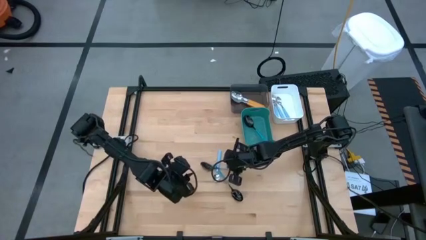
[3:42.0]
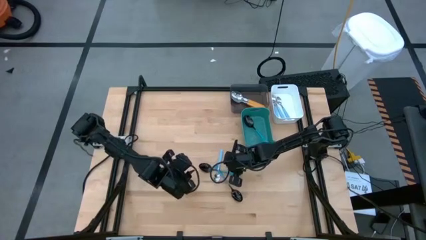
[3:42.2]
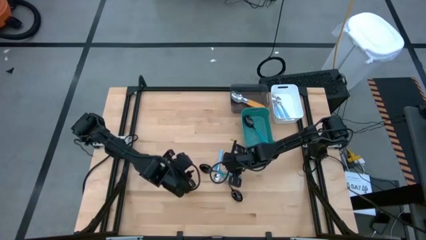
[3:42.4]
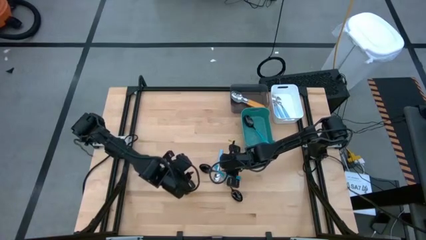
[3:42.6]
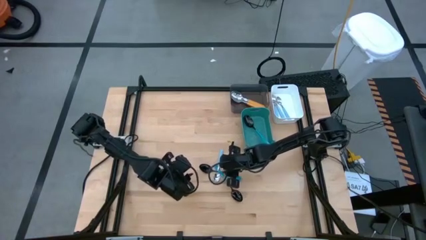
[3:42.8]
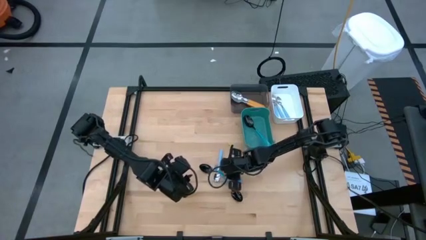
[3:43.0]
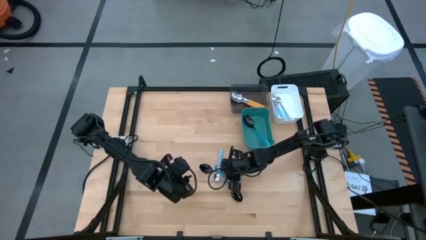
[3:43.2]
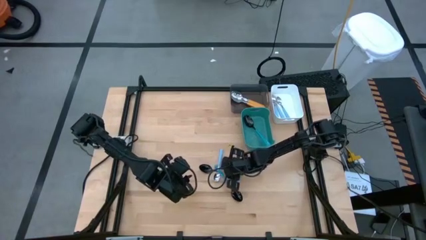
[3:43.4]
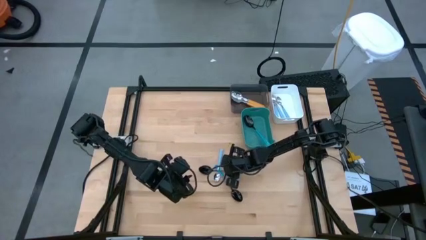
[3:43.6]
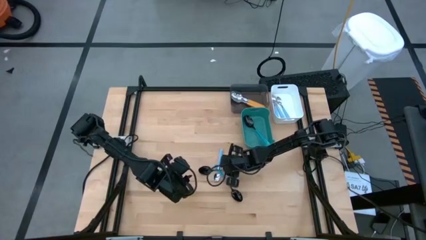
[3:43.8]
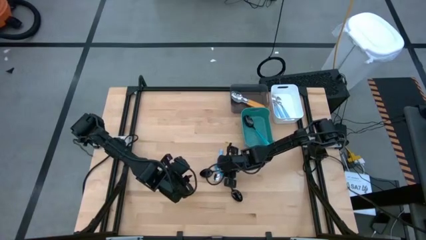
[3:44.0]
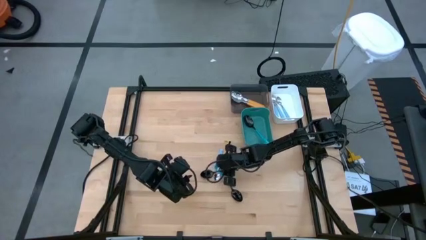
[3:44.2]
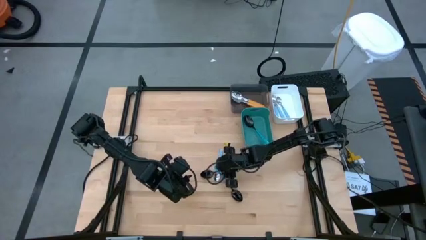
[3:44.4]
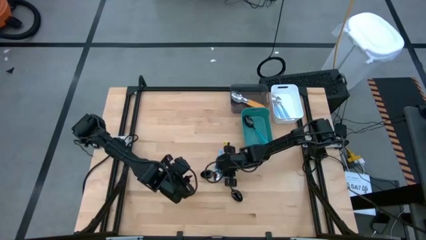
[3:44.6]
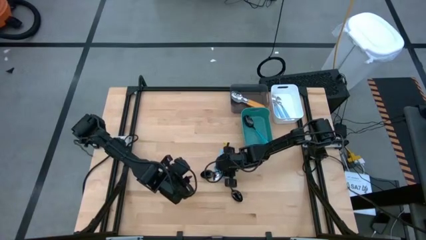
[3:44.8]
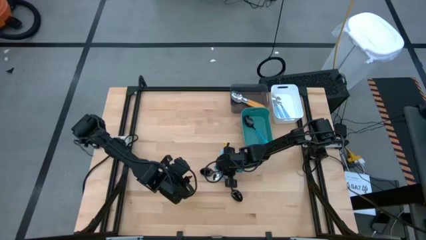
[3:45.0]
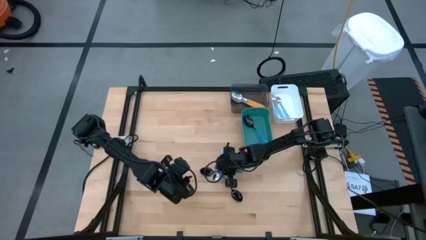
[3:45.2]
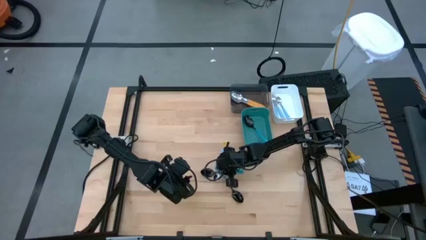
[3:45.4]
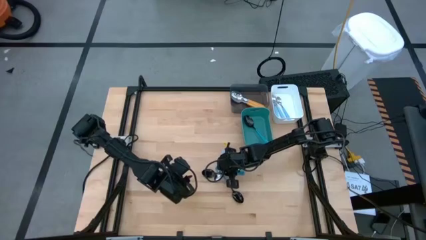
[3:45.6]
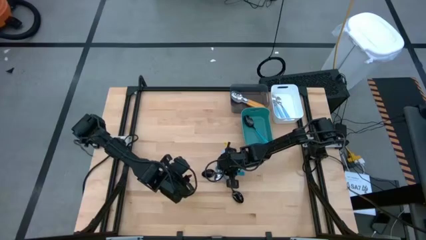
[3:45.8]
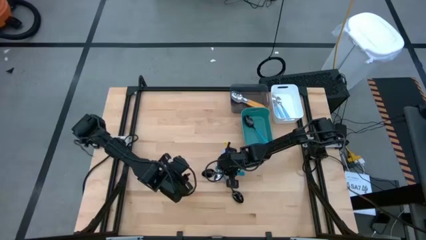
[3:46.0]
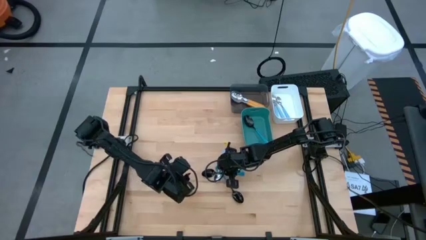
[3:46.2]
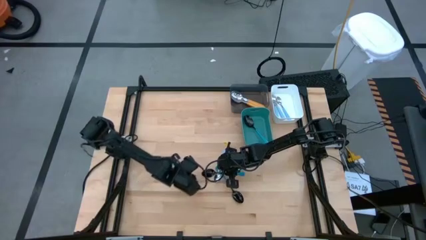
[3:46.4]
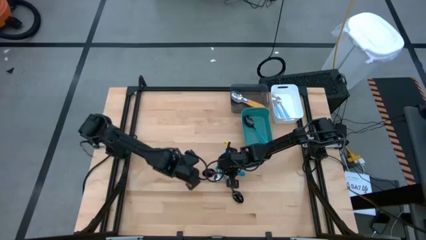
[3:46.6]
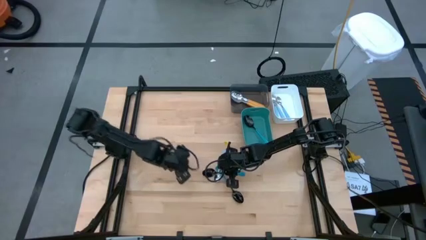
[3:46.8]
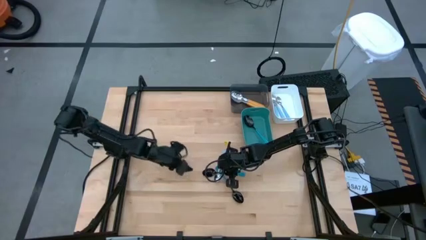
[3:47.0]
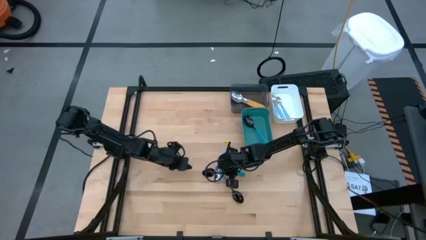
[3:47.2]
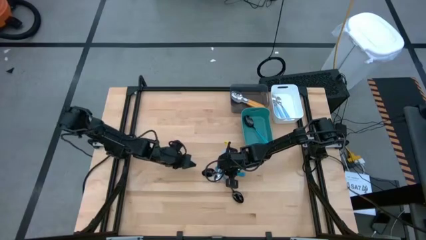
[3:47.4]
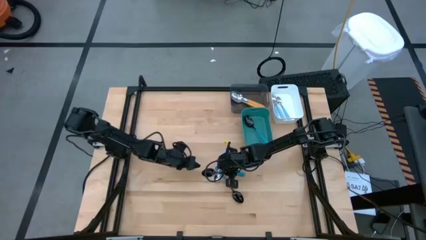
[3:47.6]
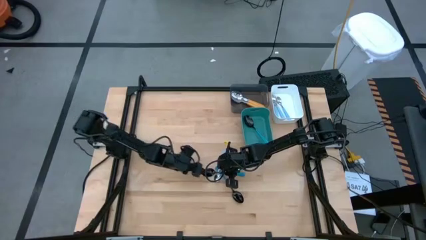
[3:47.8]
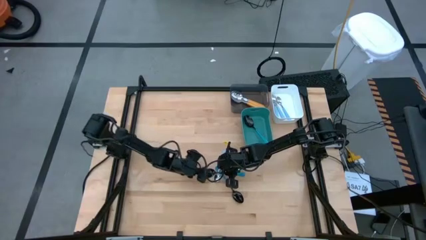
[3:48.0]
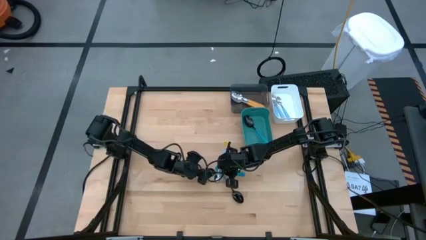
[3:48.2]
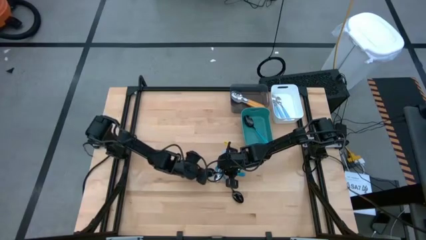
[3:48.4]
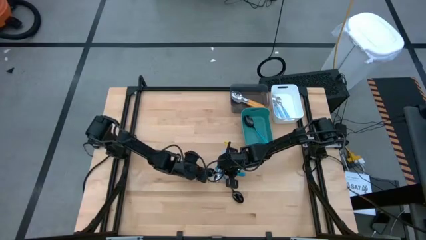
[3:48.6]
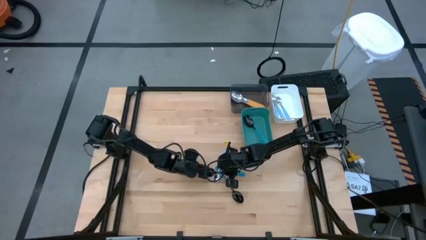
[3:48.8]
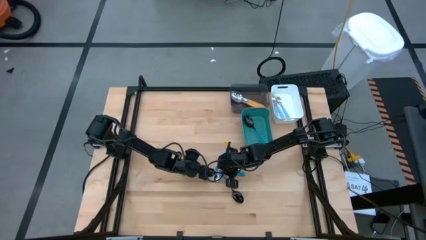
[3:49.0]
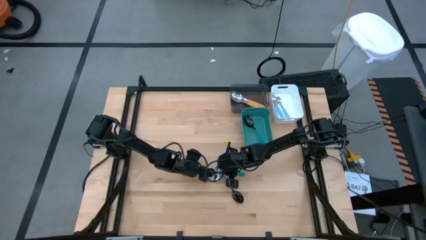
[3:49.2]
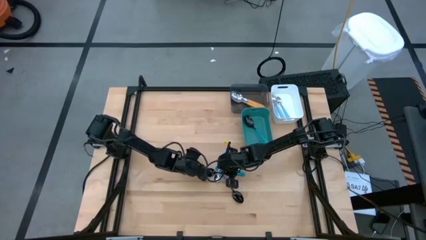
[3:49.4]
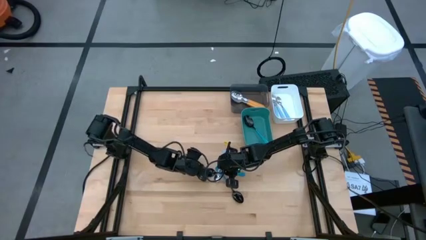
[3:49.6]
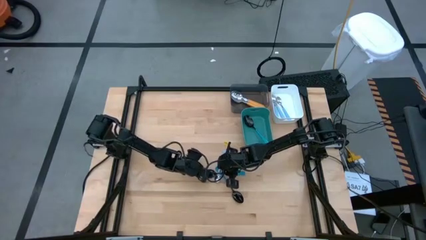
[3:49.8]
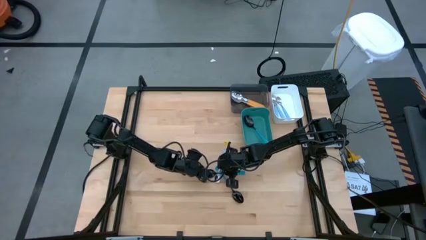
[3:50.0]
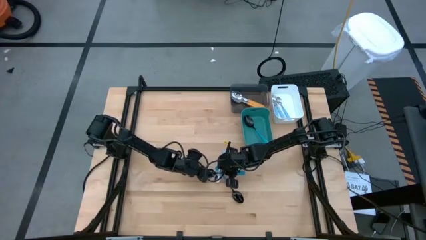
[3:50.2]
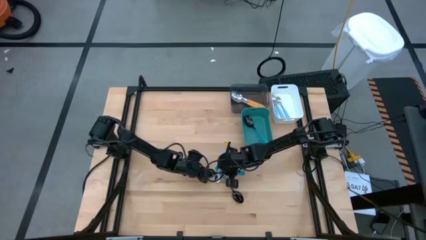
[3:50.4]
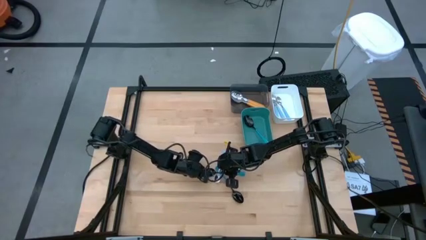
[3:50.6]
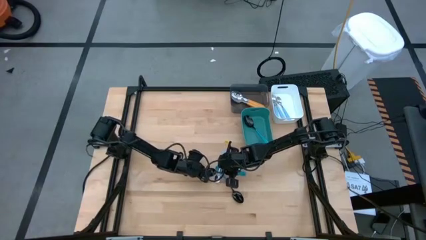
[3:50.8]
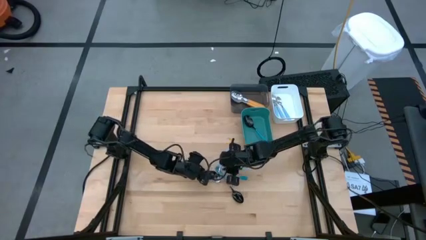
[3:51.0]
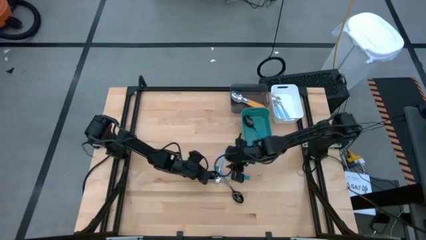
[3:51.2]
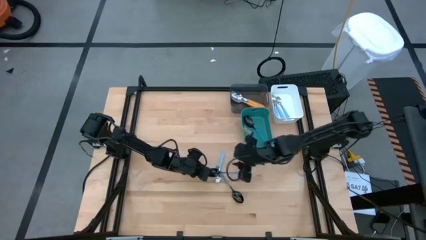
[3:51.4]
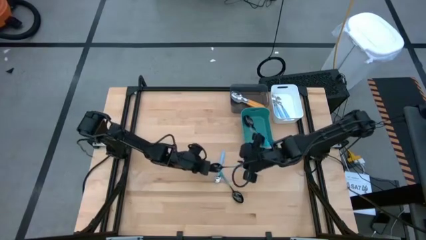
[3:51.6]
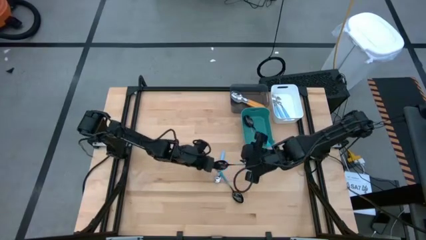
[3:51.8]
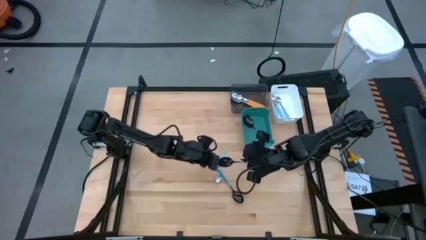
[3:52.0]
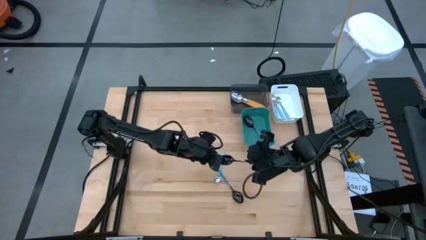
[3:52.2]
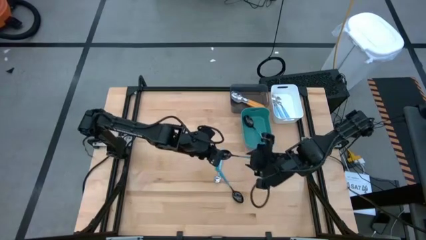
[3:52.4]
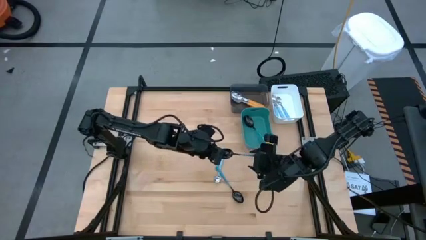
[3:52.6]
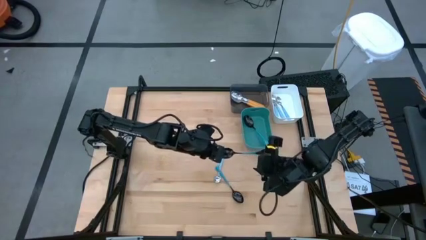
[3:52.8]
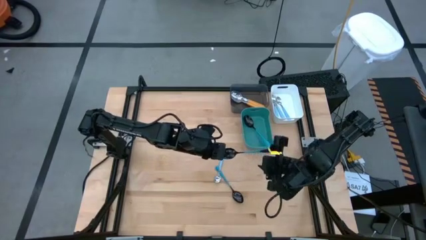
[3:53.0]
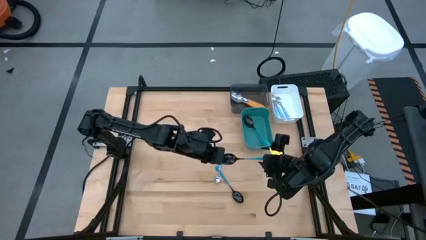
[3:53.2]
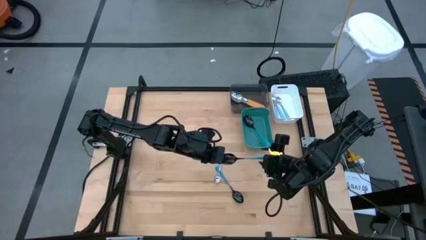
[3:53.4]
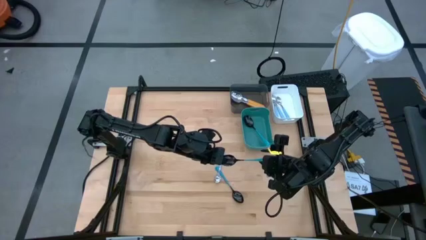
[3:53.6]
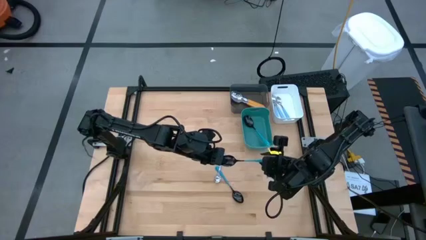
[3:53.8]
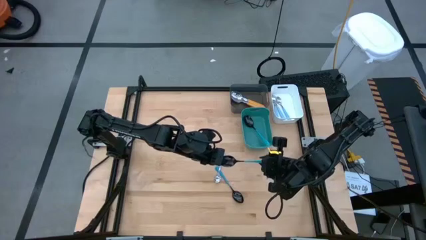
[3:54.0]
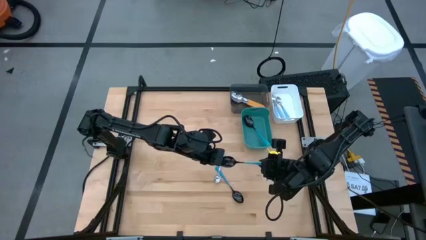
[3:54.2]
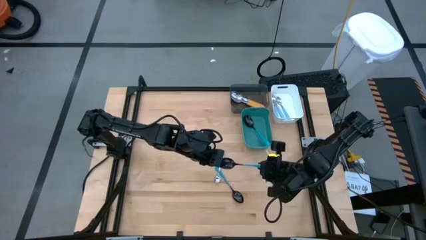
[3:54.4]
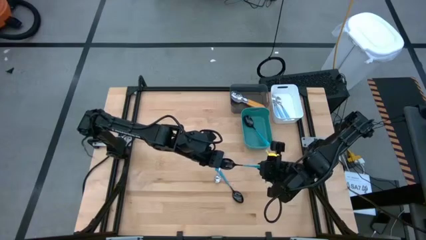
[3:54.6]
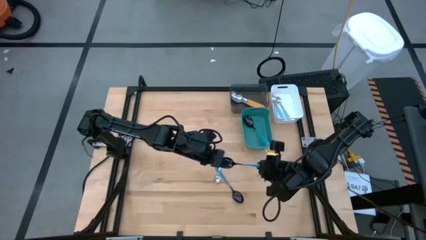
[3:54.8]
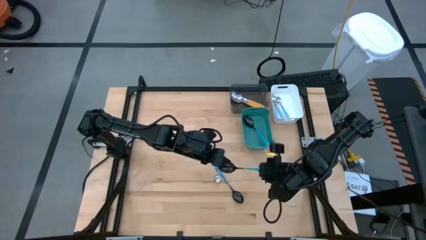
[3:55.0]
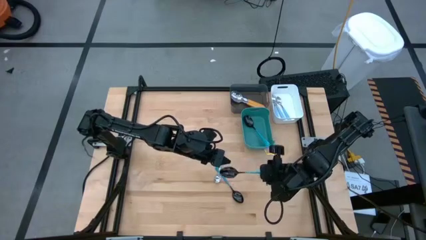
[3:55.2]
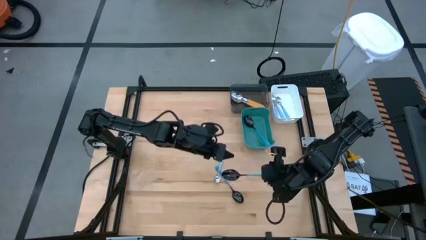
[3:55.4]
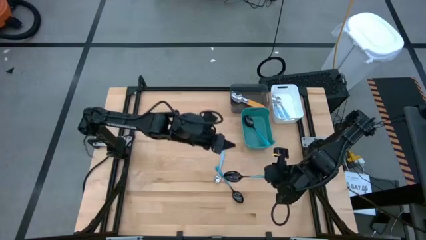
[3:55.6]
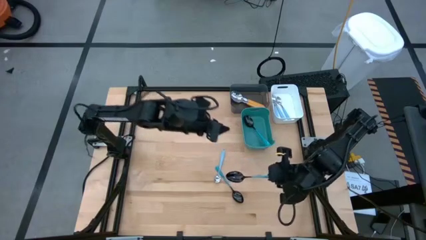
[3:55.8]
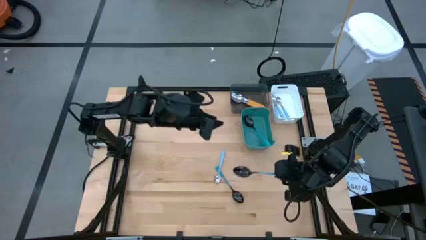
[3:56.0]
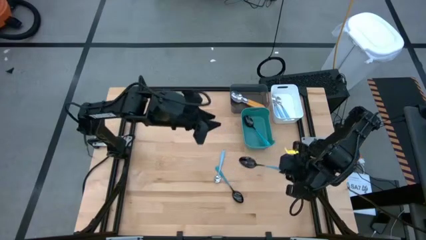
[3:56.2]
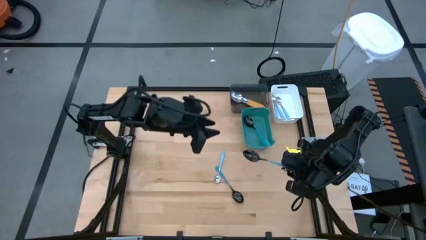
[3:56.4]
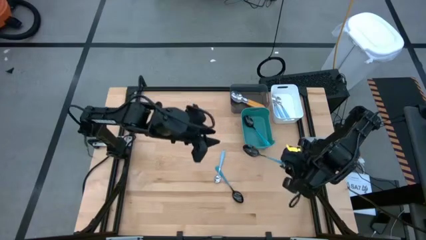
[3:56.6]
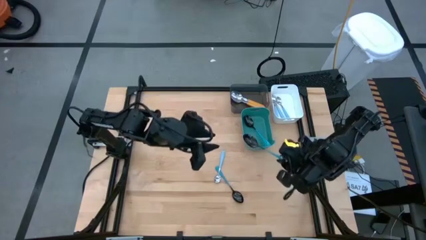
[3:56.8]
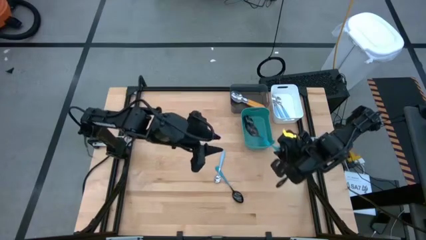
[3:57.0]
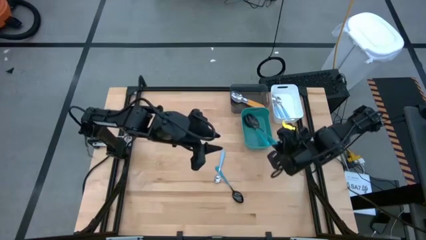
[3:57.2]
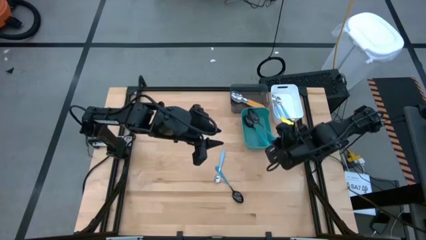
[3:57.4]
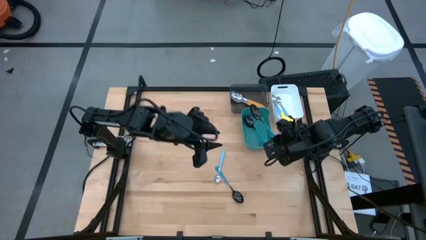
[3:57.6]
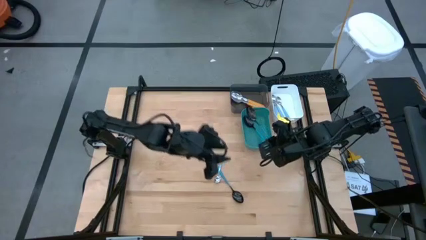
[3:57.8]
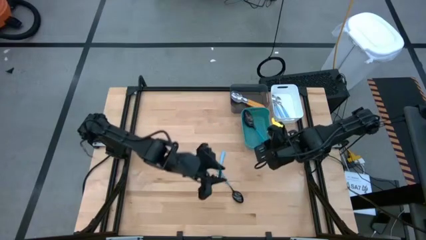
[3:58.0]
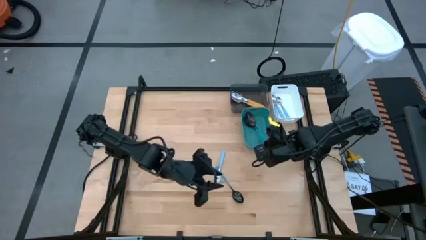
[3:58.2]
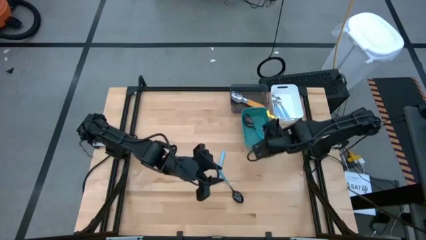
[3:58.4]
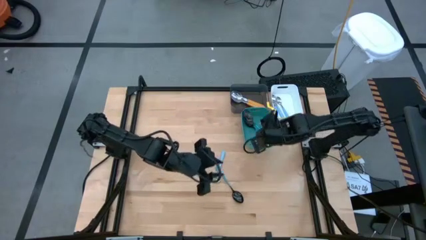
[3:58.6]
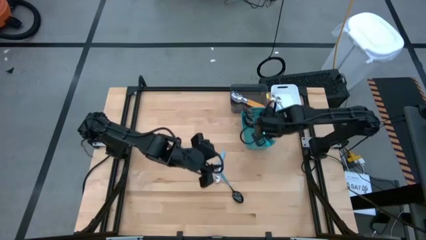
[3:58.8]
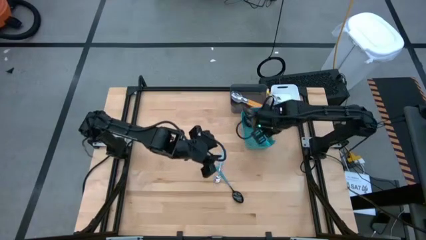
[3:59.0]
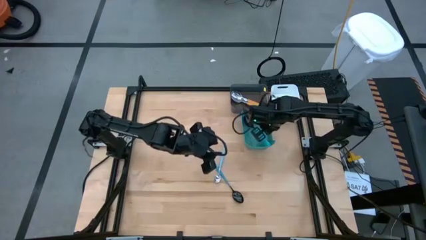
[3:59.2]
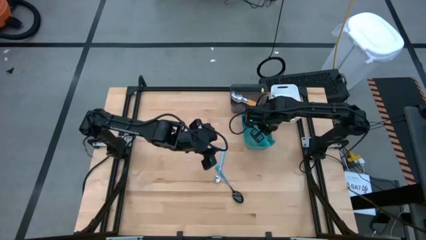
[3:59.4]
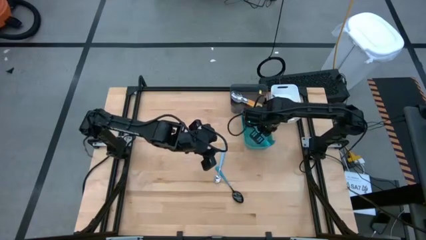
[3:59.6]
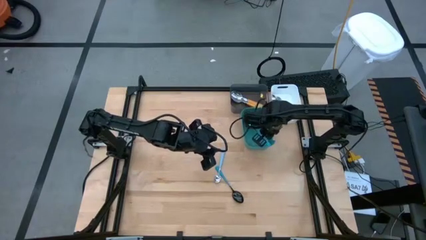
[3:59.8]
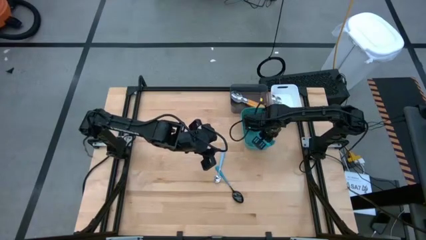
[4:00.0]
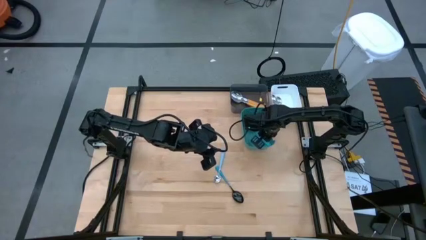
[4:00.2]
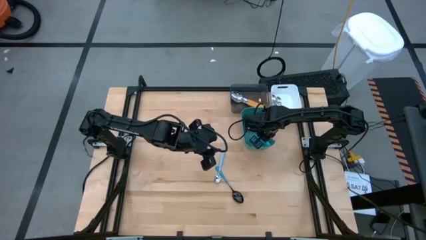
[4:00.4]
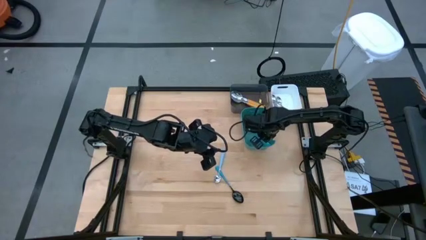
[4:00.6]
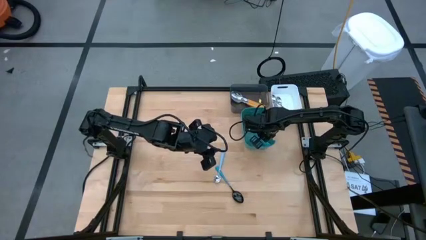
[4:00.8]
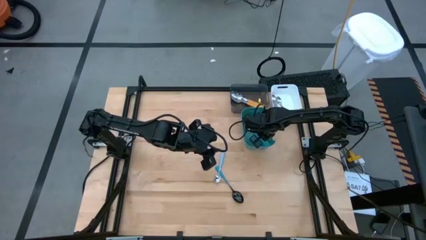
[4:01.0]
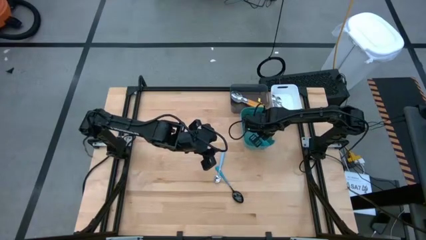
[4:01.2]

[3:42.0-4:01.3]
Task: Sort silverware by color (type)
Put the blue spoon into the green bin
